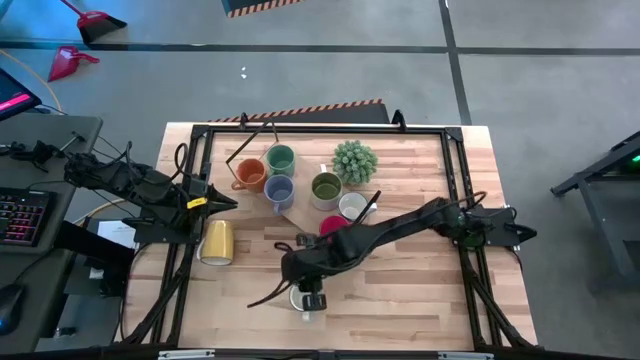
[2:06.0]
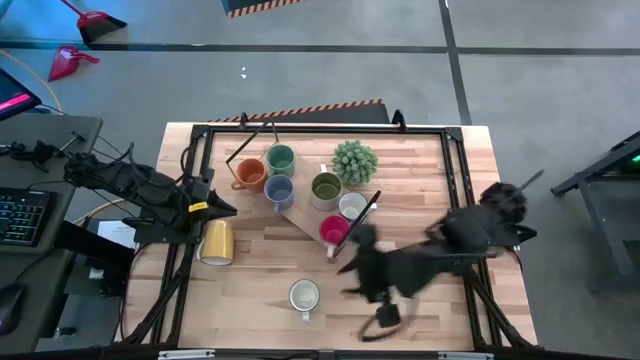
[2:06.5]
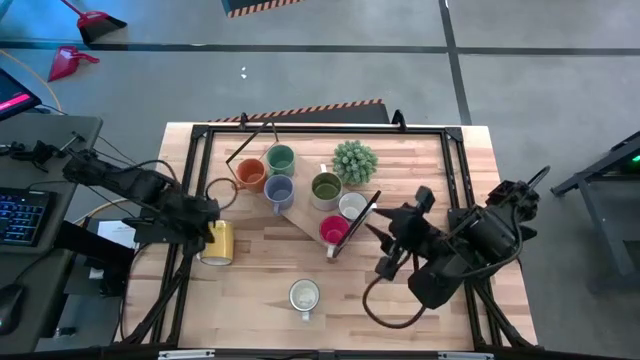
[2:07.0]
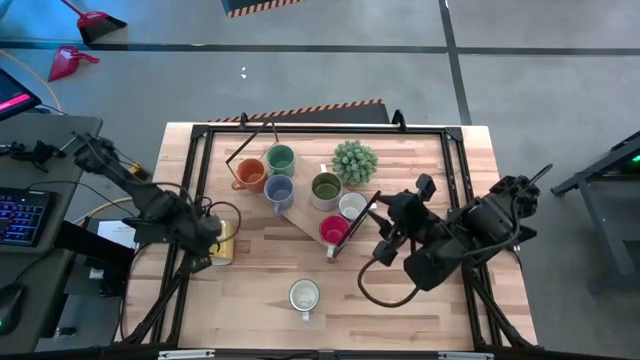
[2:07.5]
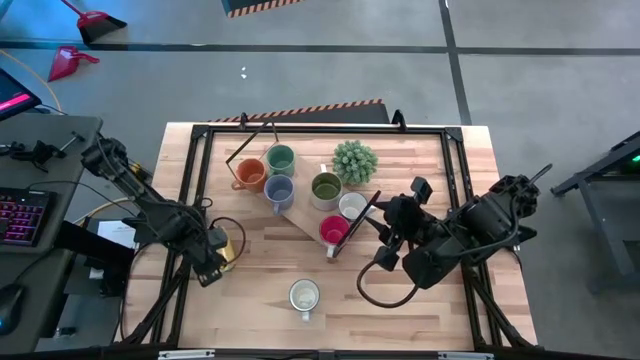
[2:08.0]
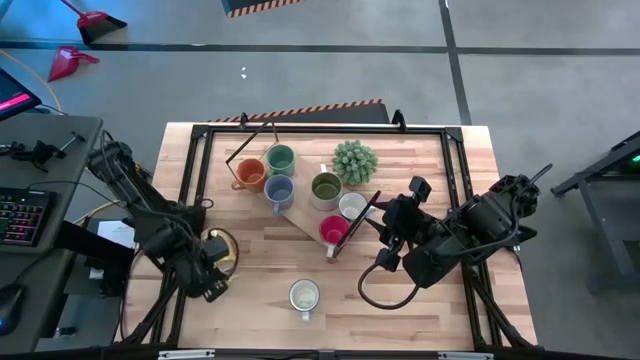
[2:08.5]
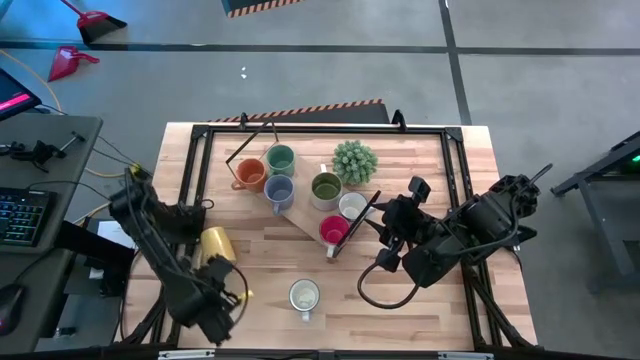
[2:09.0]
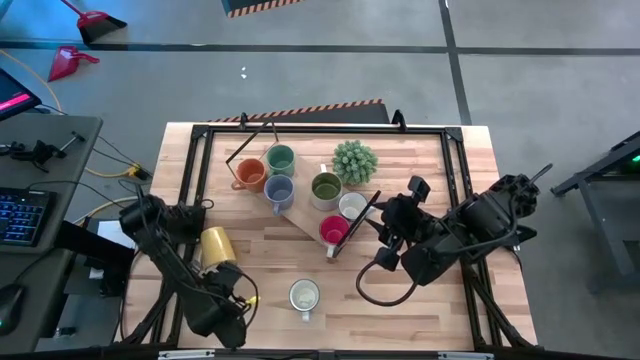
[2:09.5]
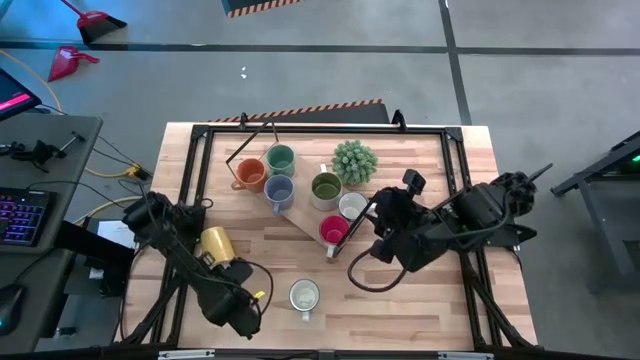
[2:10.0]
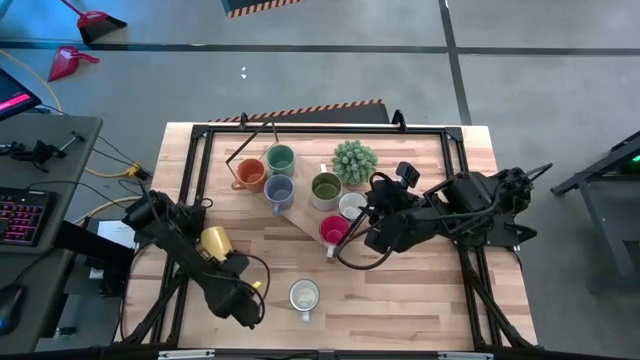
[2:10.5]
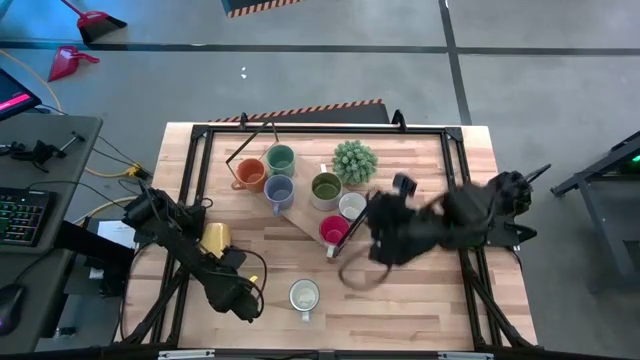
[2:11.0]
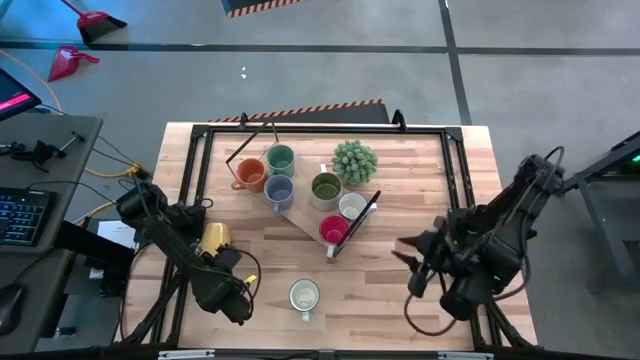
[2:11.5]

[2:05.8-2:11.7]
Task: Place coffee mugs
Put the yellow mug on the shelf

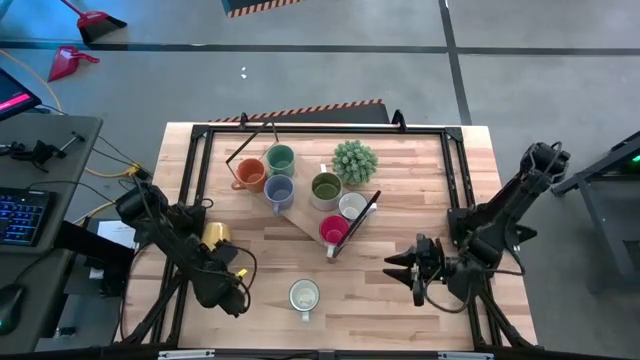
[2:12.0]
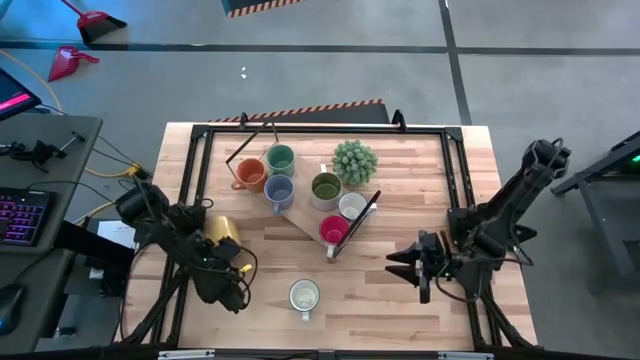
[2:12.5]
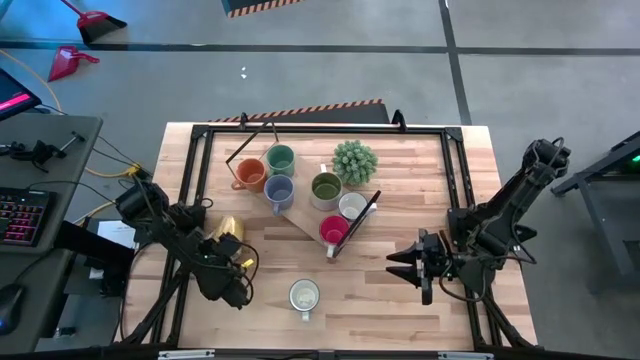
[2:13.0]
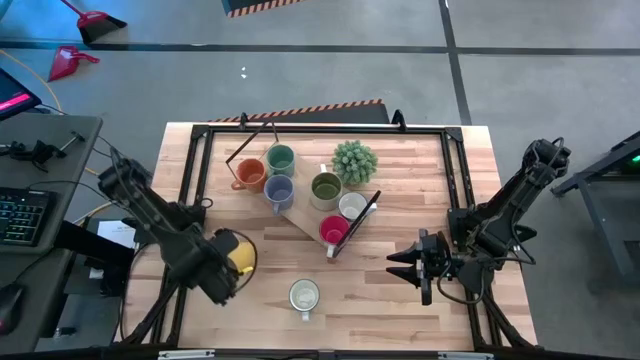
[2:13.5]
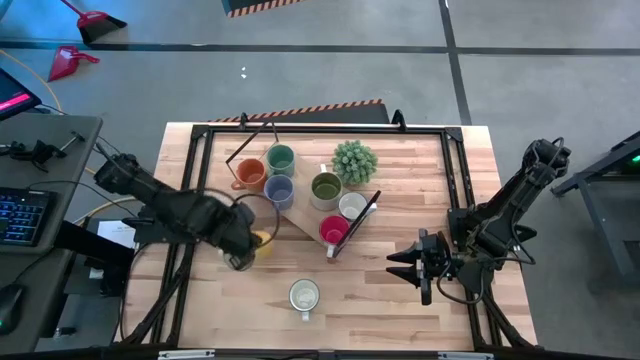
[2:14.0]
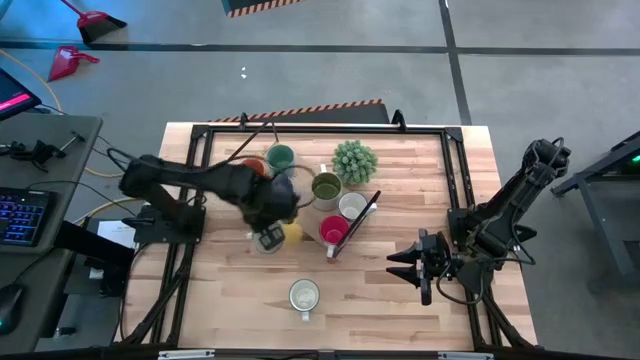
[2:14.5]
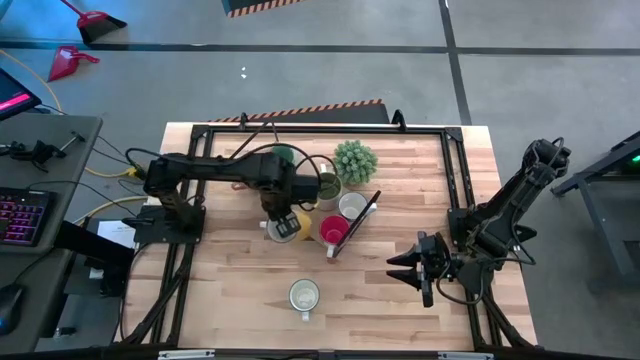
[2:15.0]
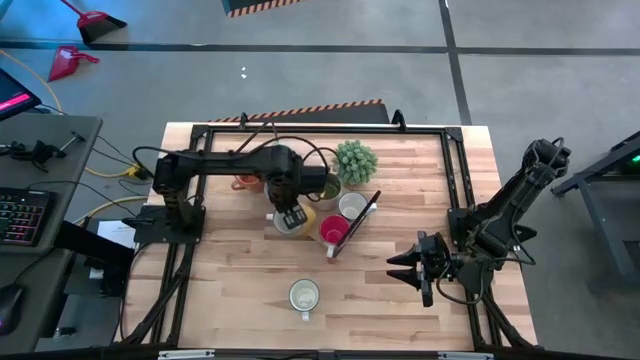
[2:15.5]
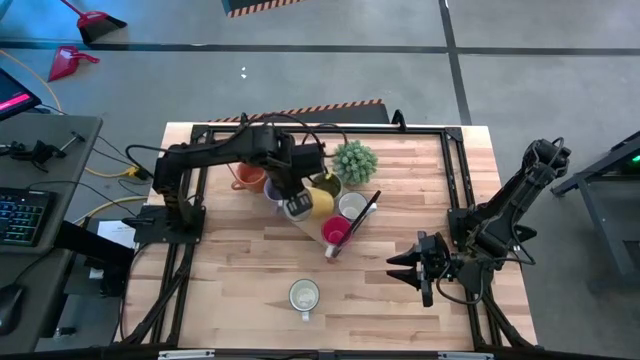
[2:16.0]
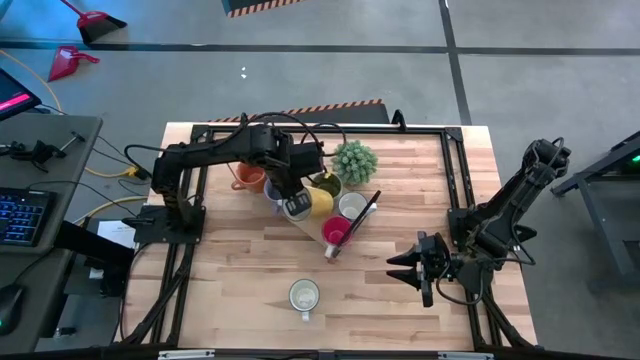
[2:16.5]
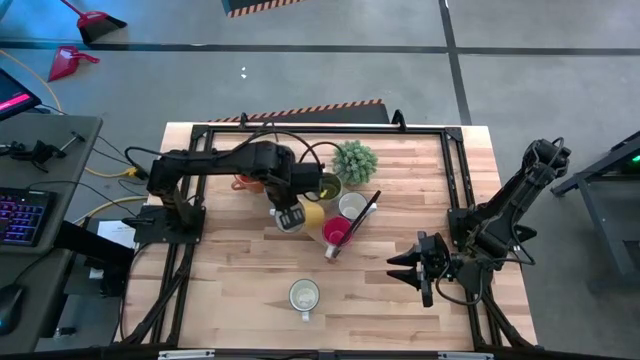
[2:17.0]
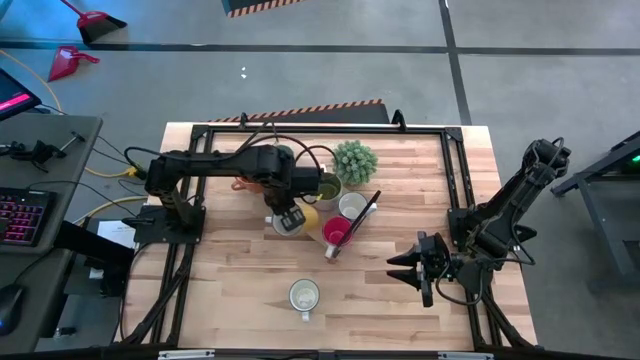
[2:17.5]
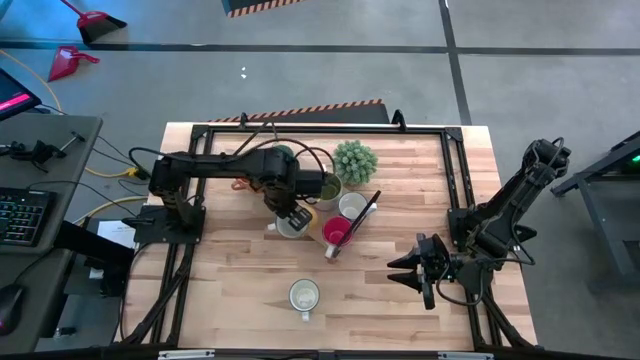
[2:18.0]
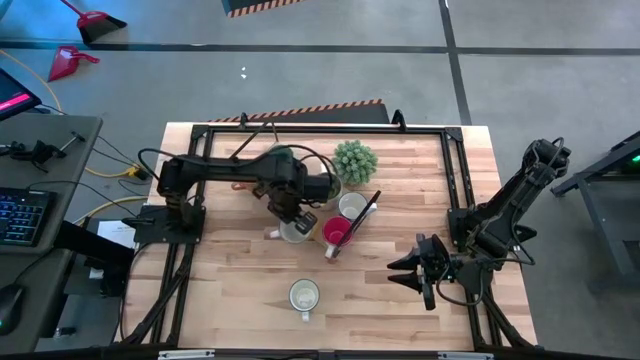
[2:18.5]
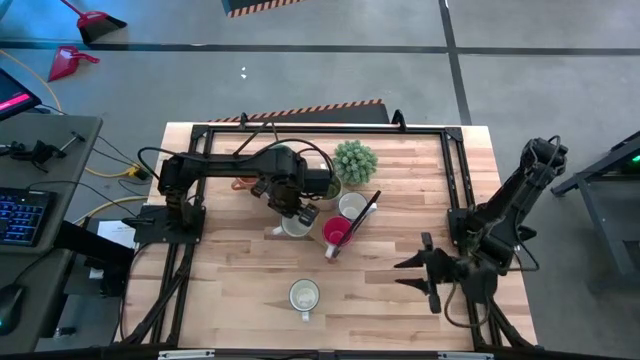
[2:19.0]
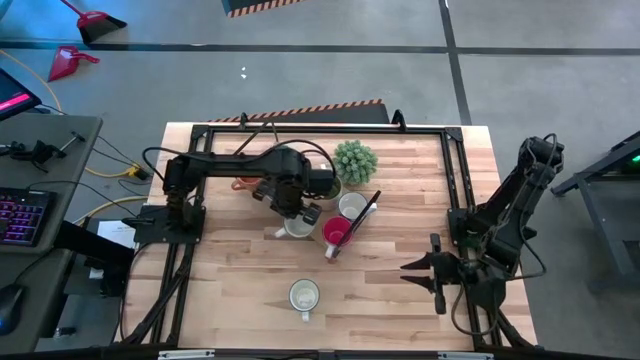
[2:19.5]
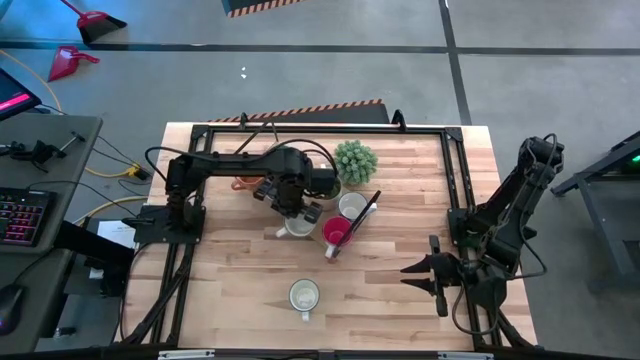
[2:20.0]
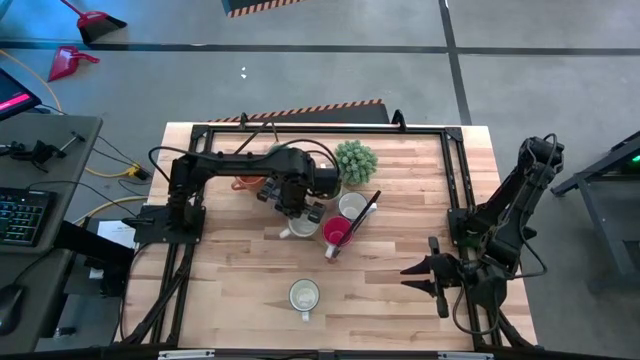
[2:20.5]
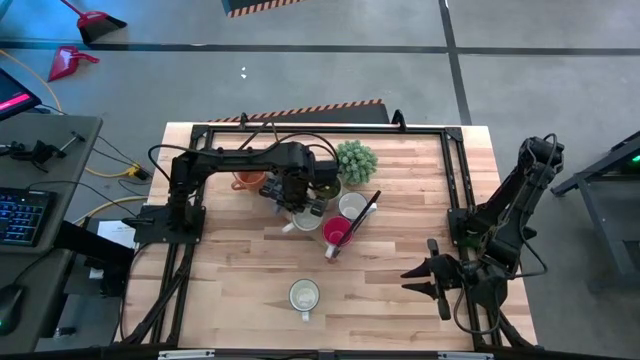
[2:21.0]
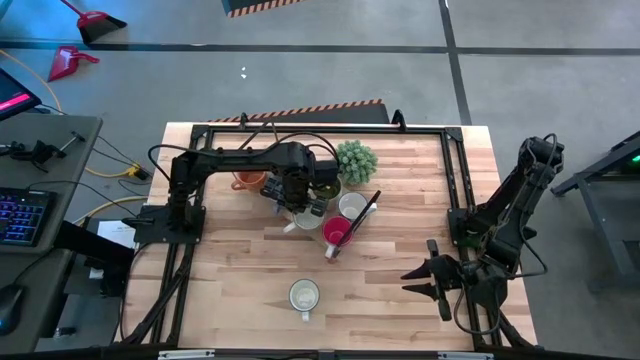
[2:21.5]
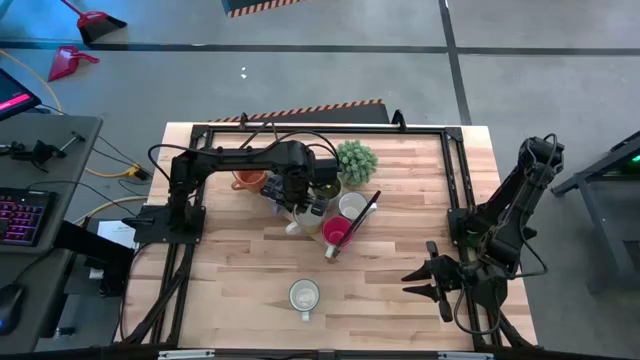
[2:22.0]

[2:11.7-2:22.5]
Put the yellow mug on the shelf

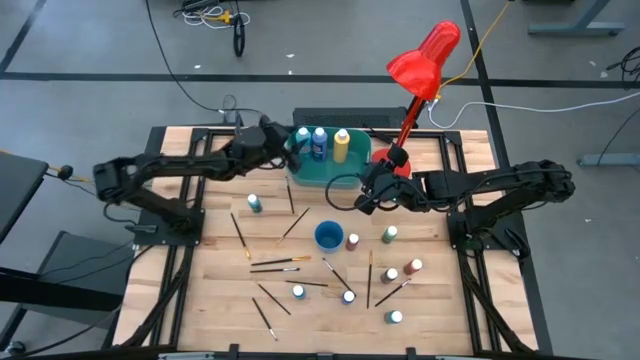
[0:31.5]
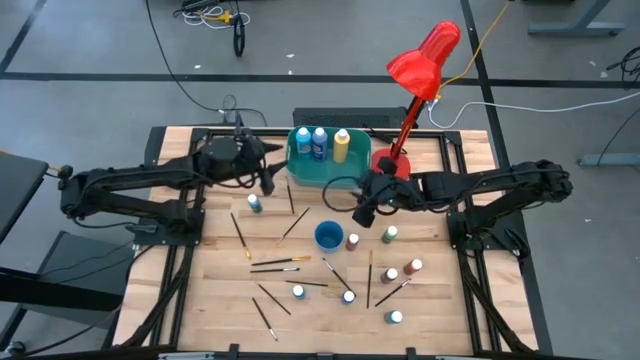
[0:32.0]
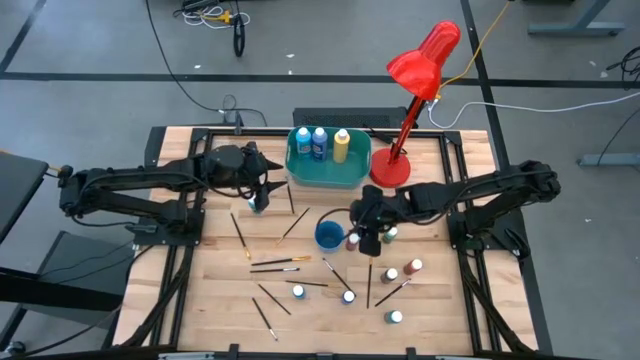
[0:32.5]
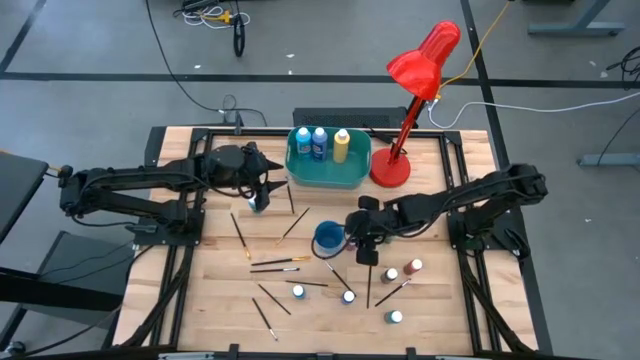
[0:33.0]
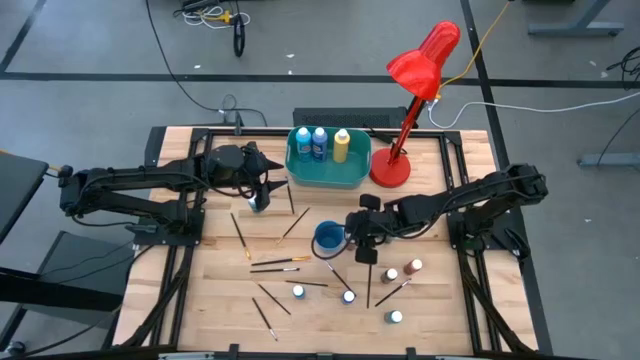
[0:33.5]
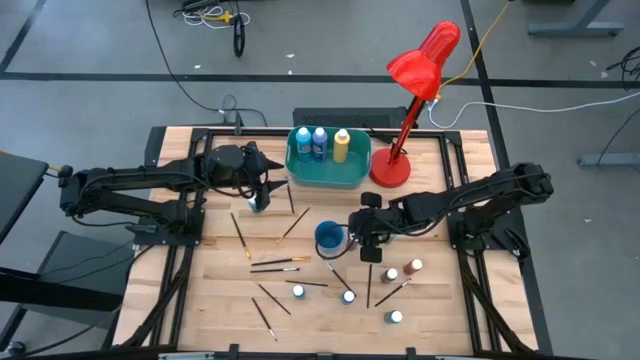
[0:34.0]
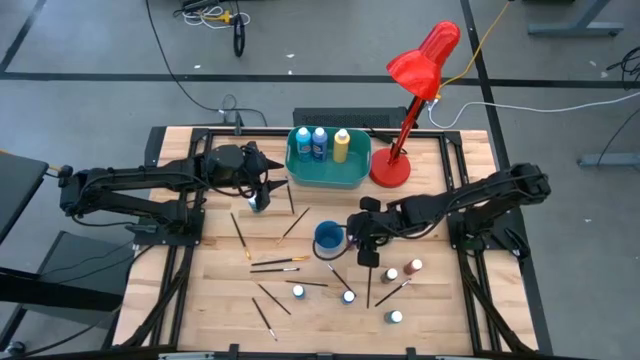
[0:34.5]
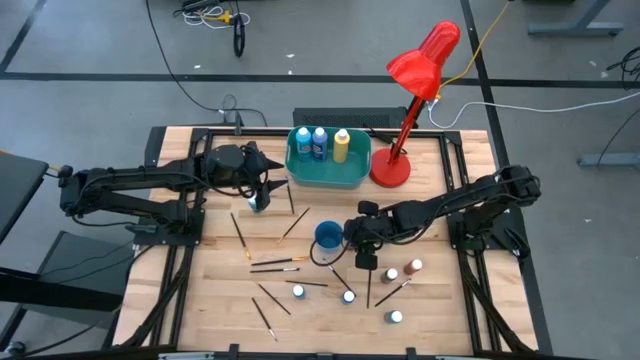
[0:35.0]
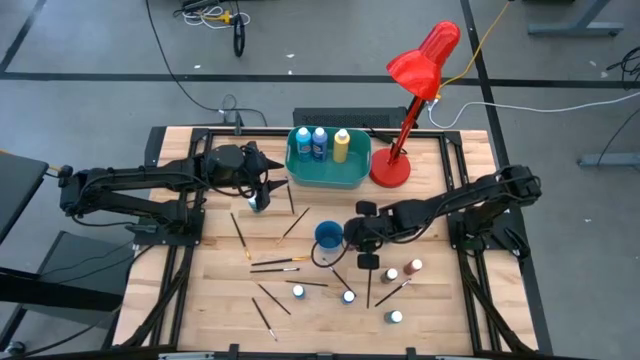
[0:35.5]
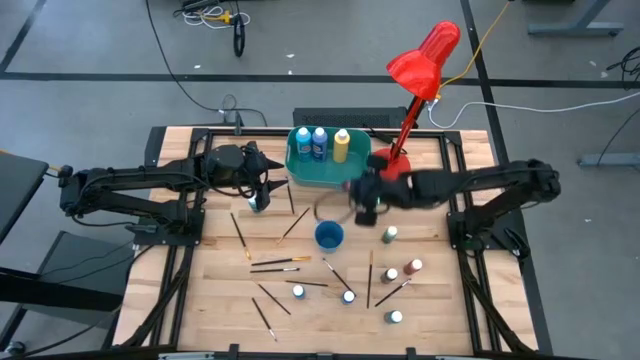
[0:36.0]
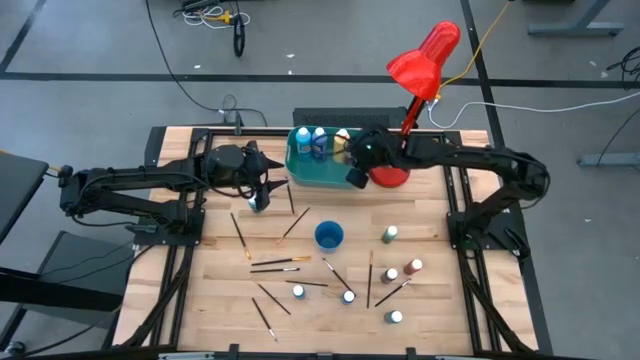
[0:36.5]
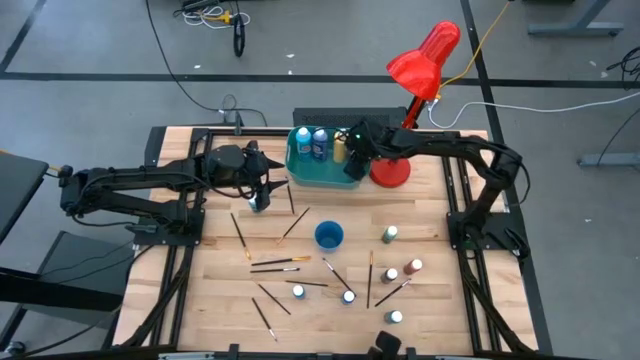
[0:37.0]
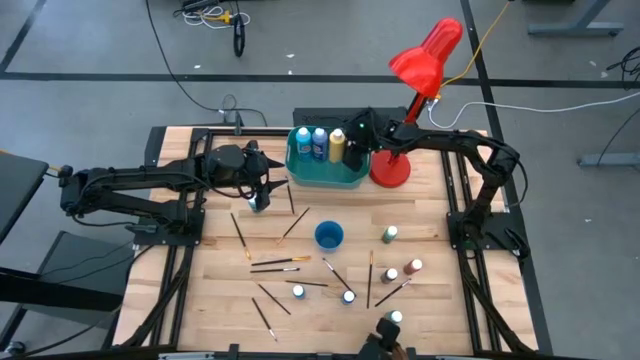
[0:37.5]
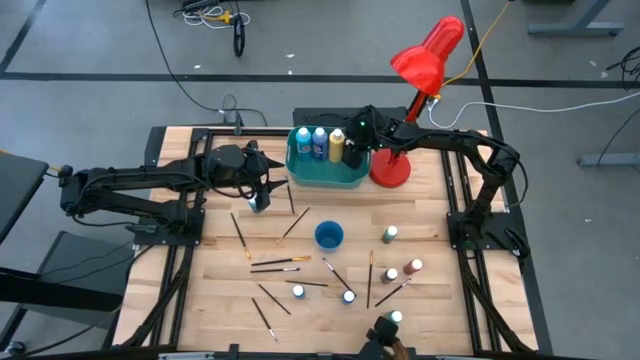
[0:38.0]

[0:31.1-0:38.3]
Task: Pick & Place Paint Supplies
Put the red paint bottle into the green bin
